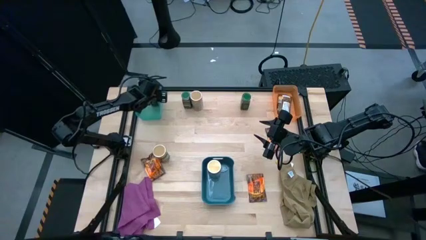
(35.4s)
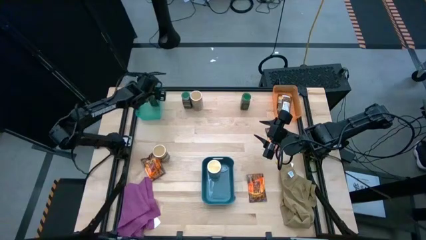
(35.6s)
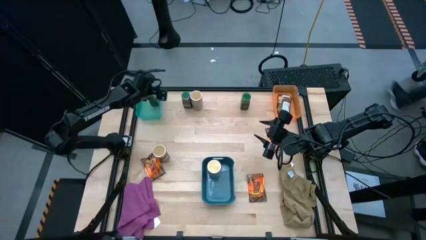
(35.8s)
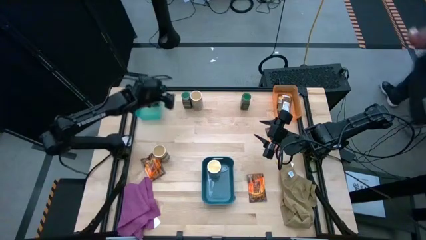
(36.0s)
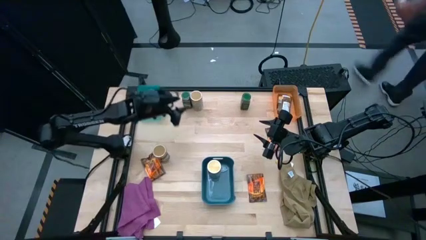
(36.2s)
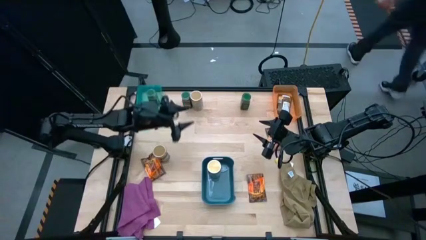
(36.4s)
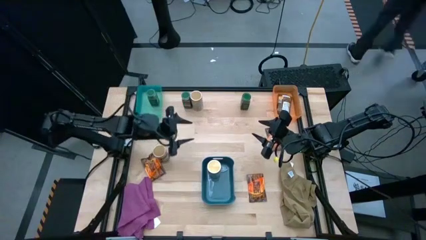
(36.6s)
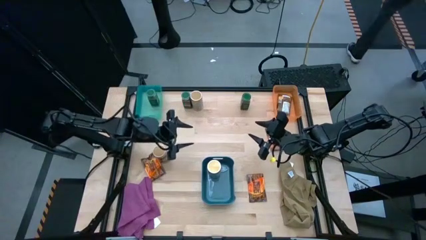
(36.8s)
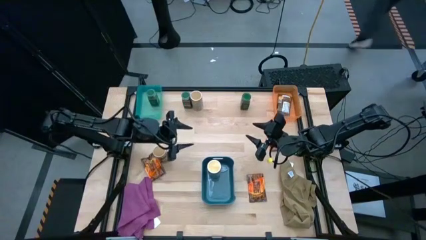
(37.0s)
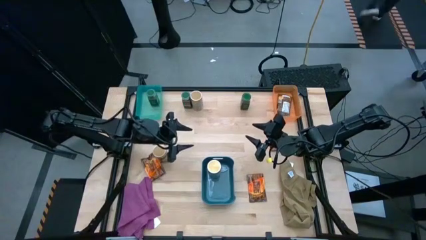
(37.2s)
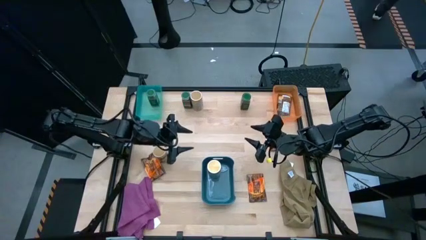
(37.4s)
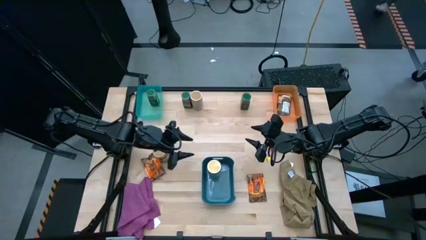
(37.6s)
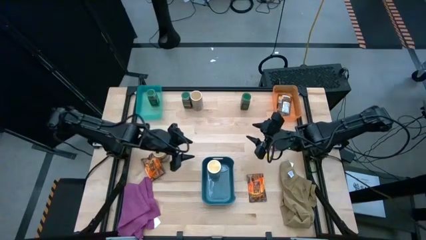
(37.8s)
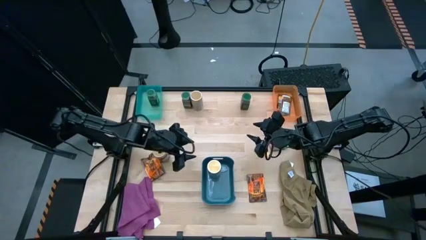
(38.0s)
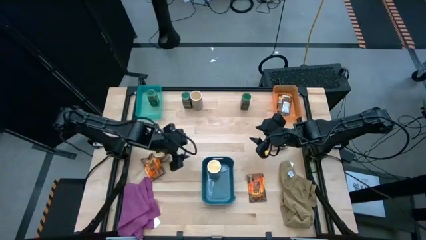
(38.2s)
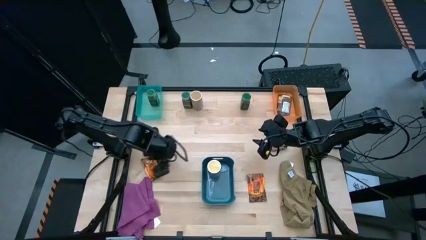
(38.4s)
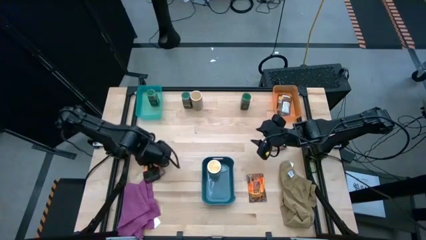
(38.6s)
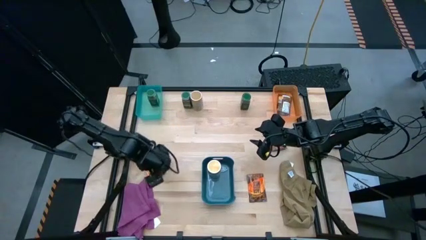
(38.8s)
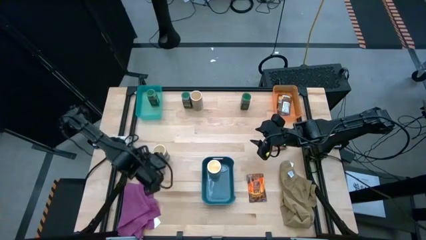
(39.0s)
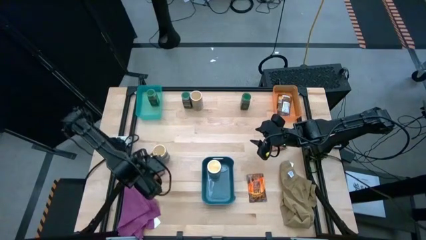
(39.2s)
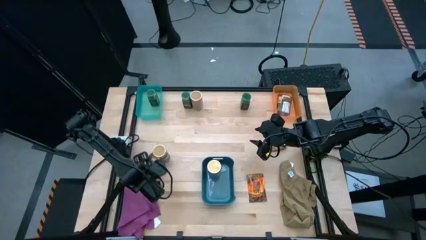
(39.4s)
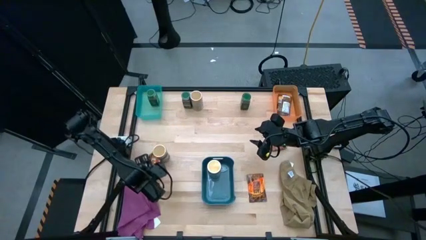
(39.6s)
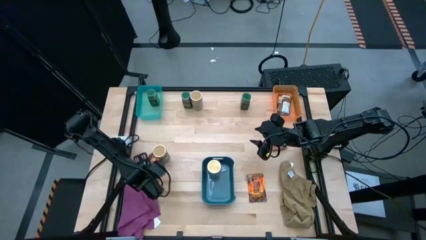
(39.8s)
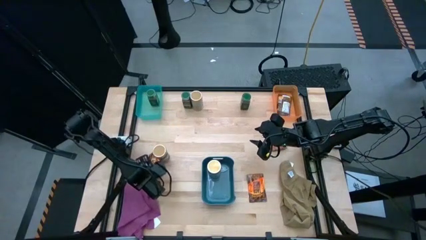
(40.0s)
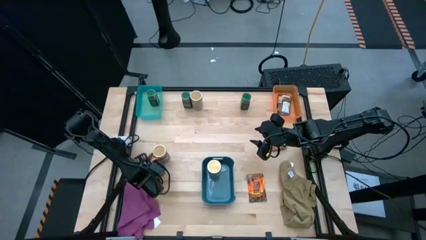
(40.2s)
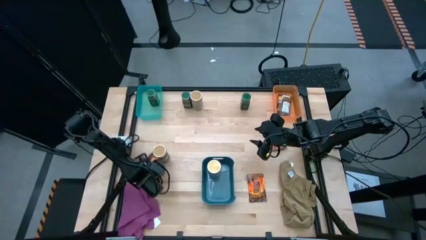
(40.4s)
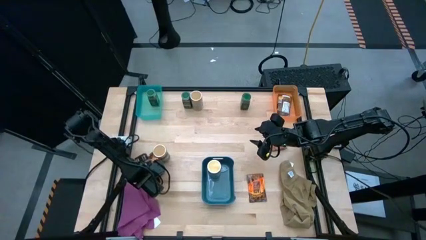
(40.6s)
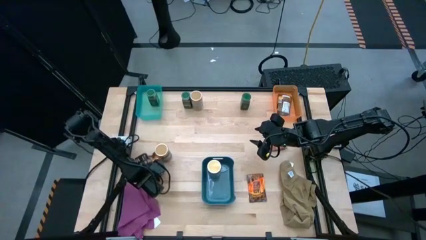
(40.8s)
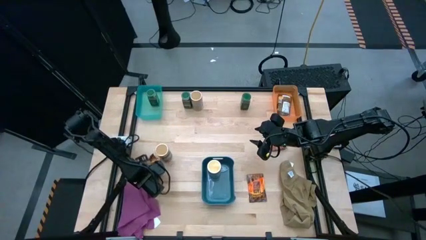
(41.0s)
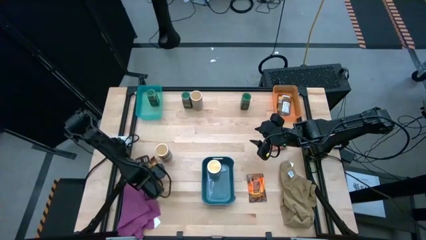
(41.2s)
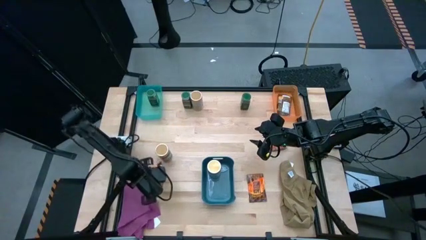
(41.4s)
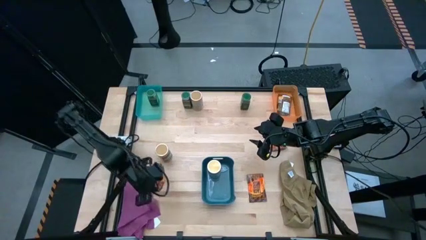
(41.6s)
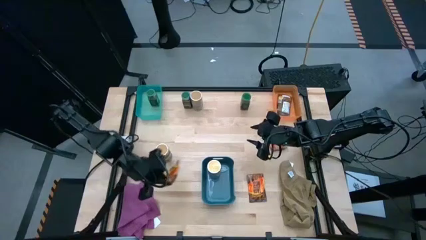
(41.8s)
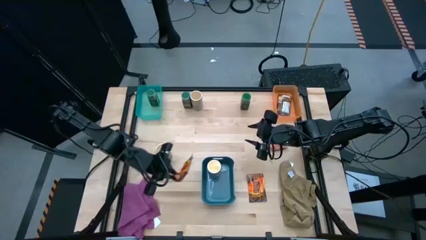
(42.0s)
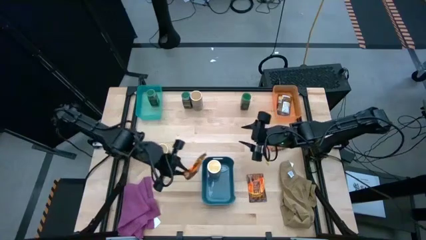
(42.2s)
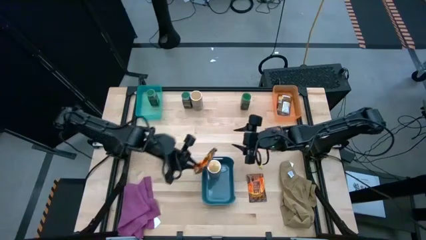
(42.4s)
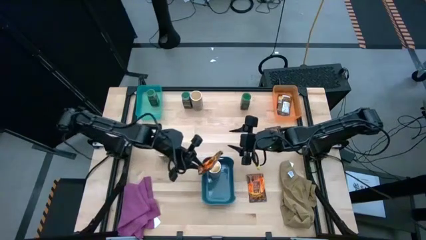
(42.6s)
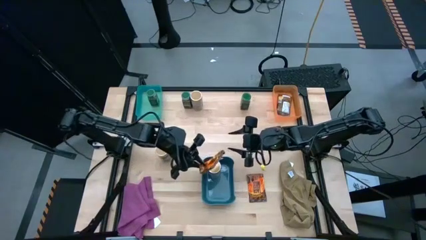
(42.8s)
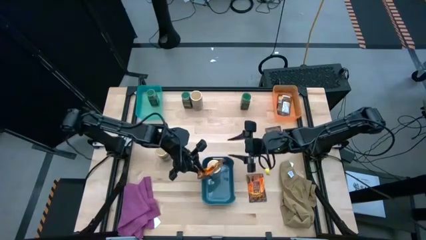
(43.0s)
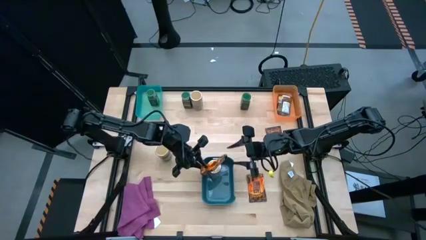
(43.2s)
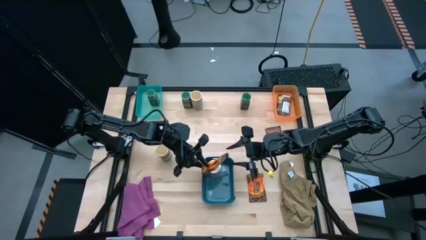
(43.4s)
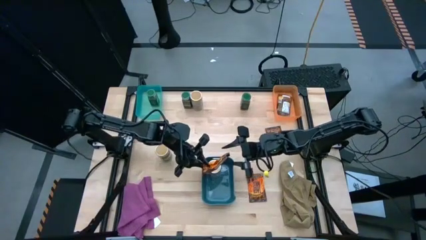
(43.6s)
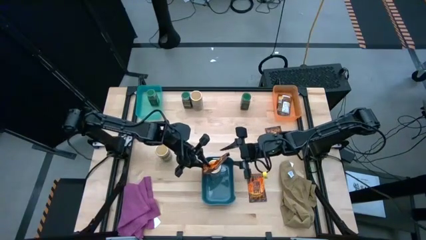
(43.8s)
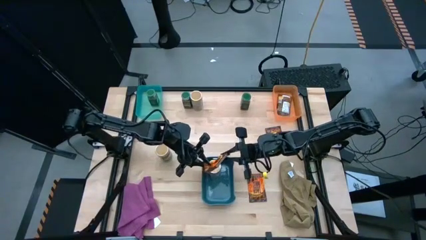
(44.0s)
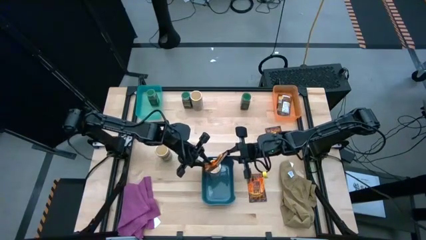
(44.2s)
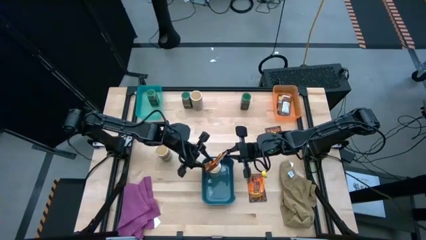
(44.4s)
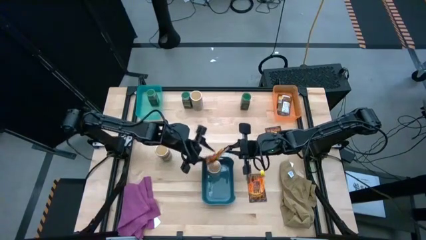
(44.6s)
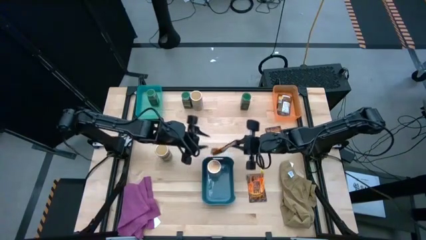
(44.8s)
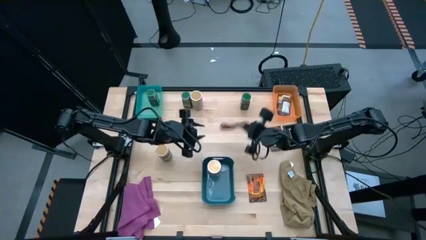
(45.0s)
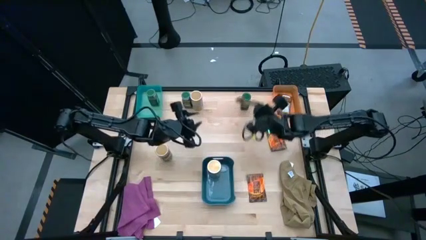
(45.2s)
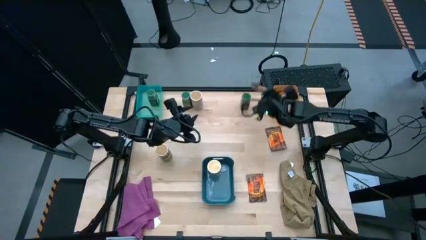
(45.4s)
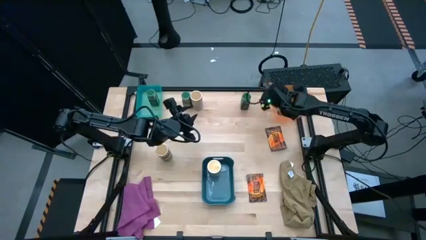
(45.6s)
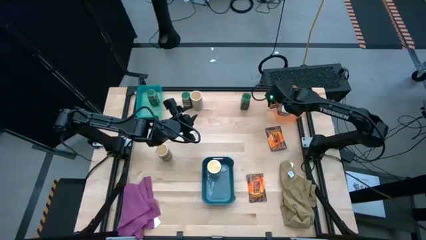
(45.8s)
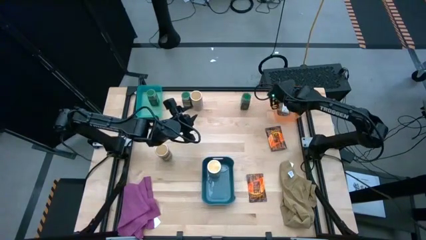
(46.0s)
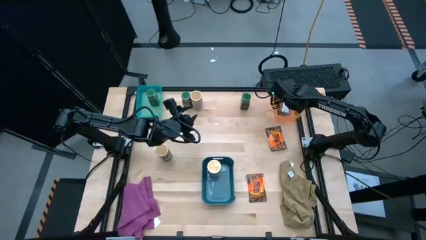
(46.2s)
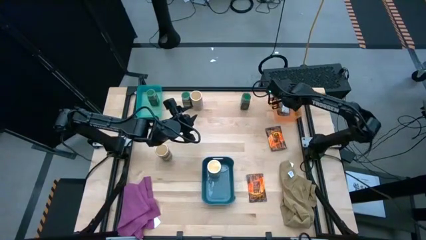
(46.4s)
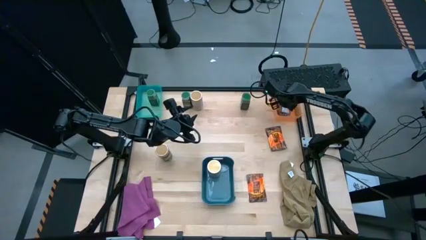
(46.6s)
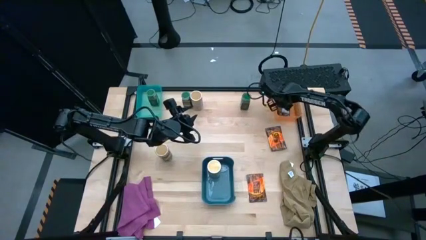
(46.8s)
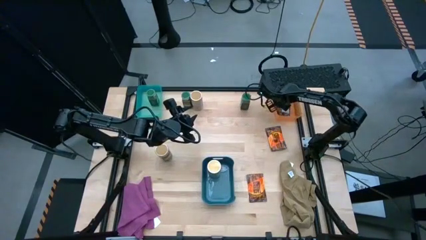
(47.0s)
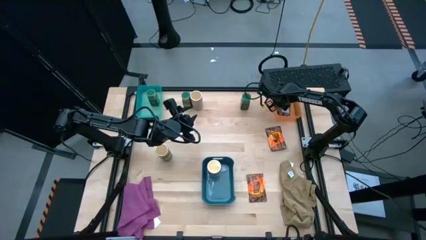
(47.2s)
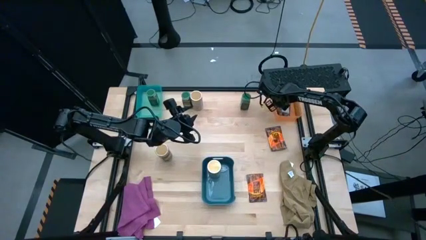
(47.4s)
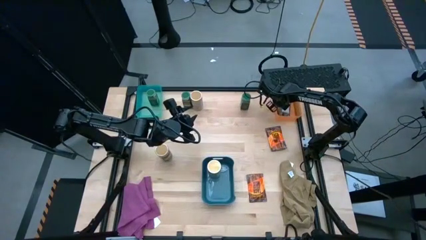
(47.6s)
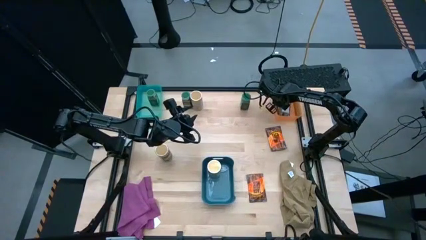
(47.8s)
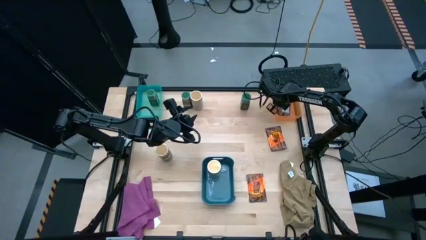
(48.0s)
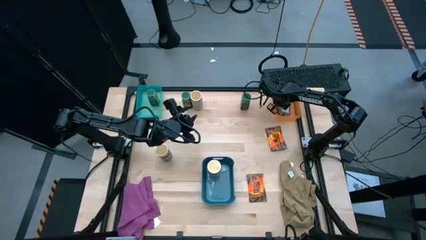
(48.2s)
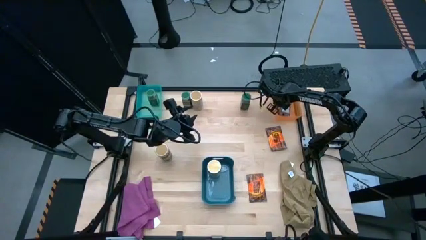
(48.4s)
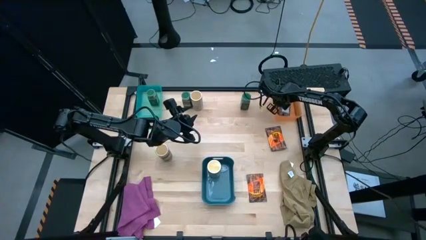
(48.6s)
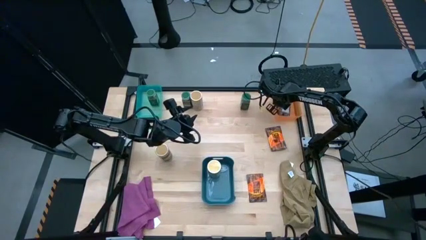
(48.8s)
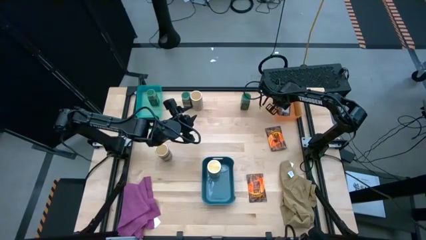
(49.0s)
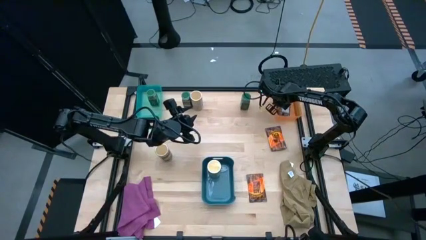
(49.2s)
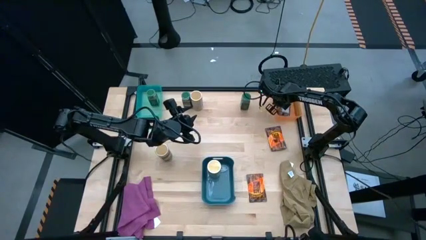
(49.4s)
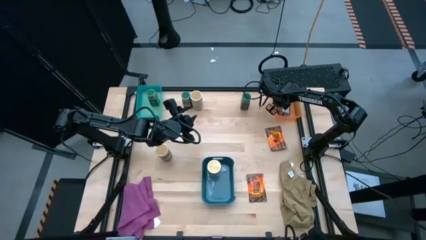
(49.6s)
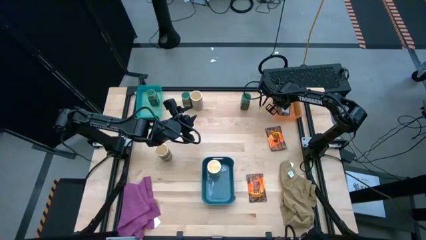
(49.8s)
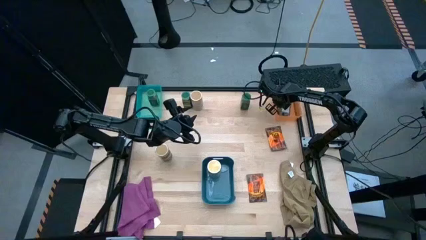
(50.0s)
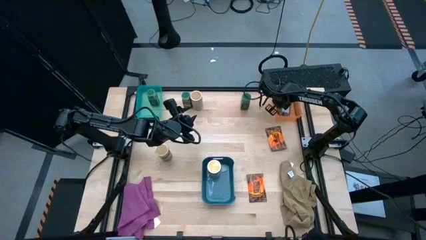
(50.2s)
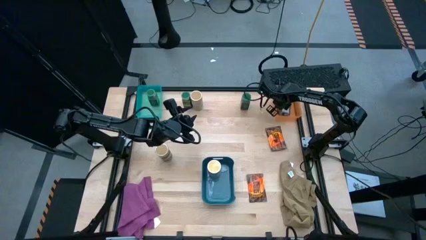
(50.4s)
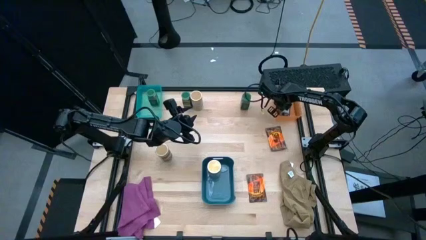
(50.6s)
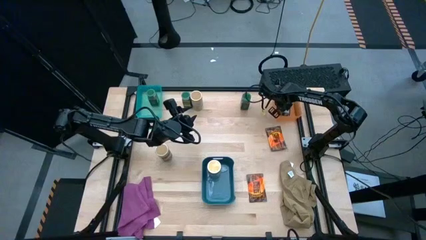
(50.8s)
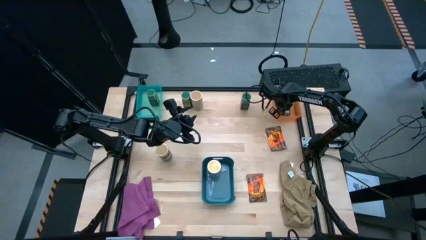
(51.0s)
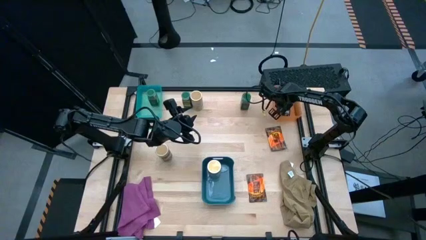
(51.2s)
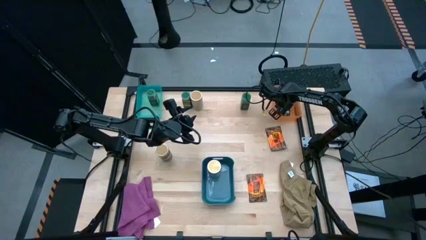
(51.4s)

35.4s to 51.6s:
Task: Sort spices by type
Put the orange seasoning bag into the orange bin
